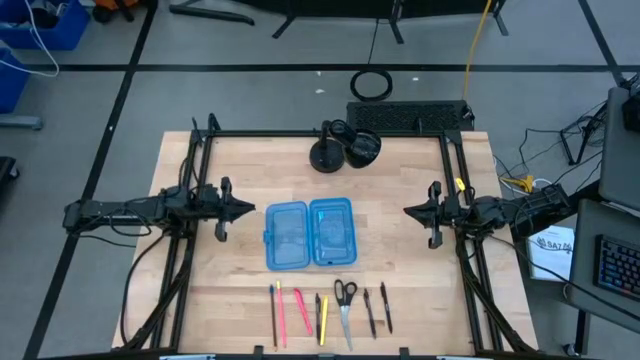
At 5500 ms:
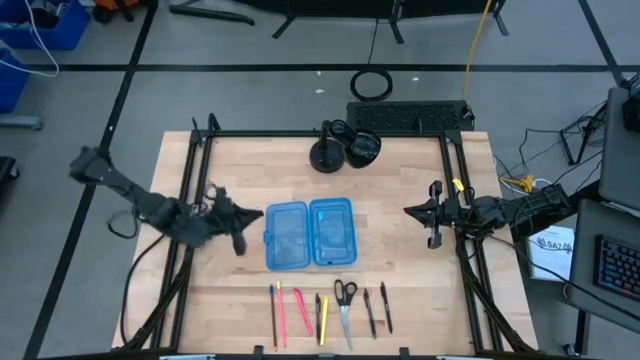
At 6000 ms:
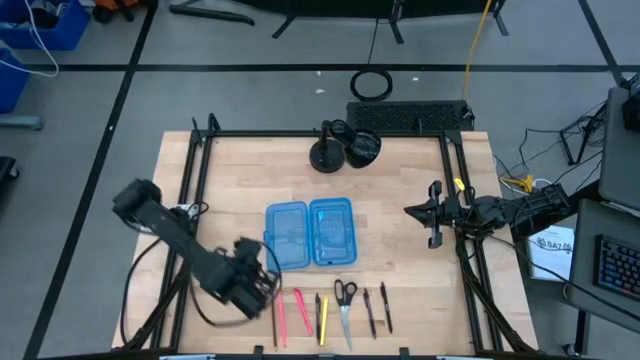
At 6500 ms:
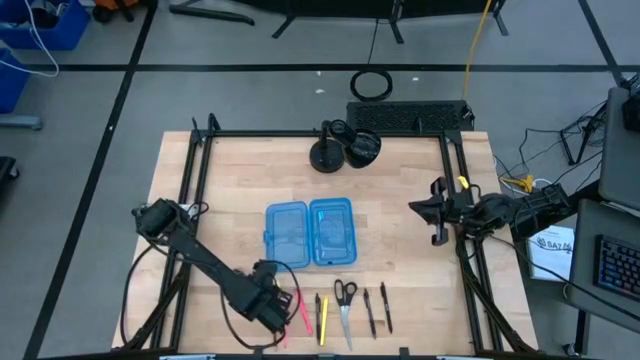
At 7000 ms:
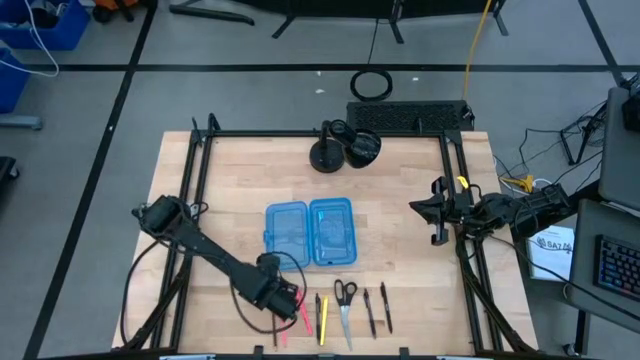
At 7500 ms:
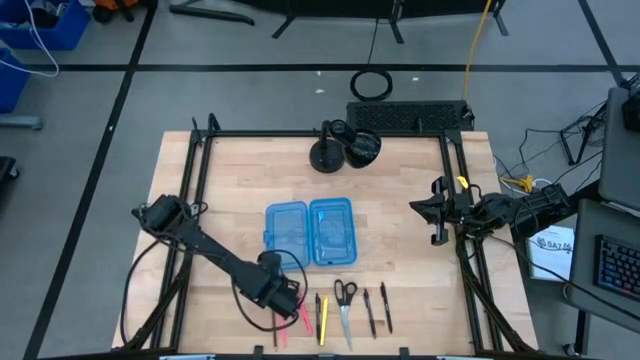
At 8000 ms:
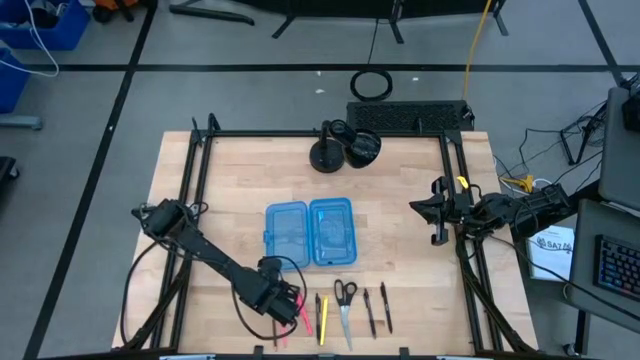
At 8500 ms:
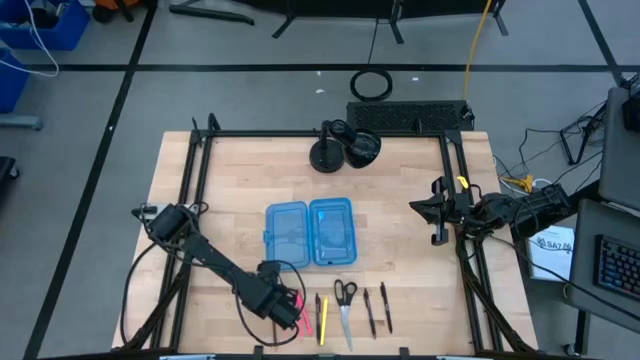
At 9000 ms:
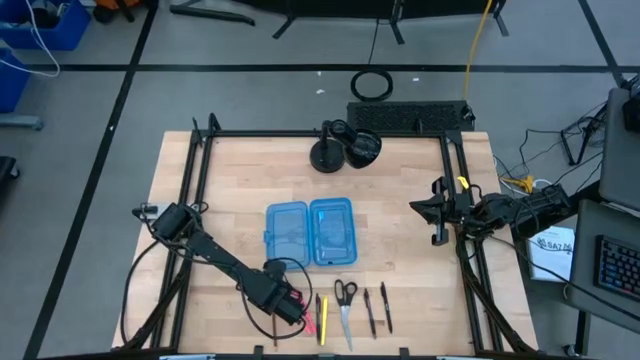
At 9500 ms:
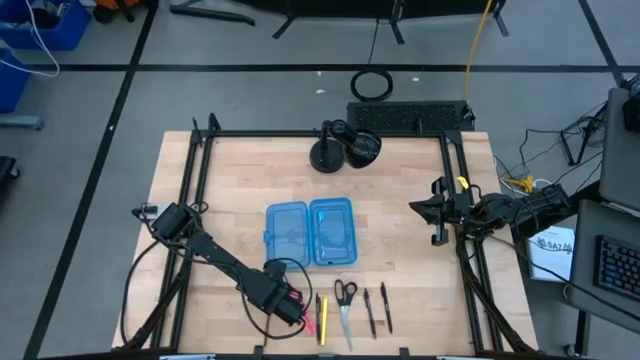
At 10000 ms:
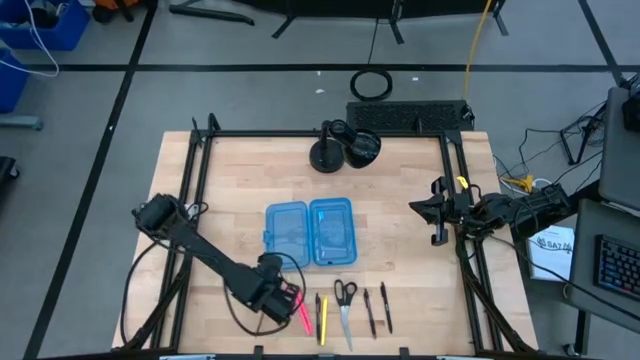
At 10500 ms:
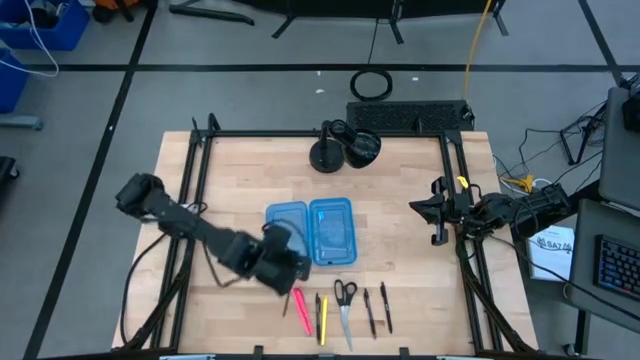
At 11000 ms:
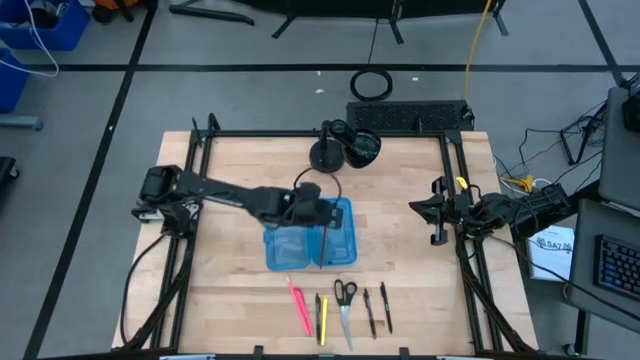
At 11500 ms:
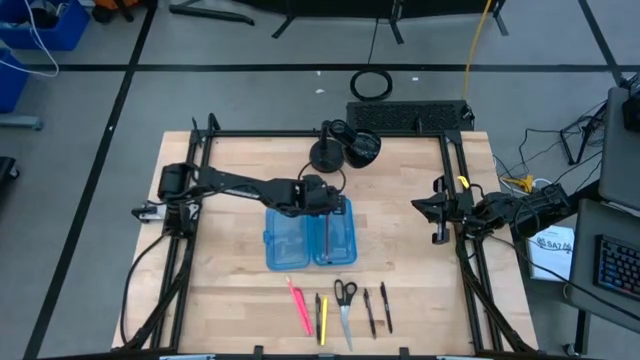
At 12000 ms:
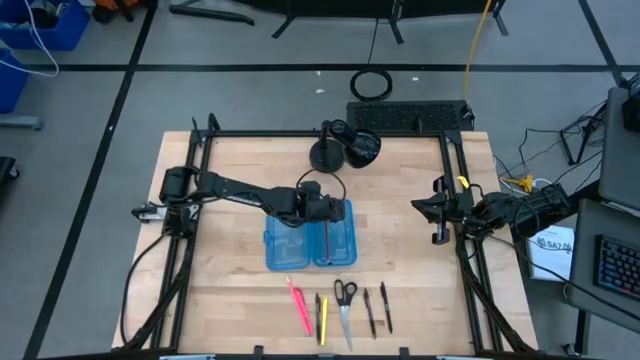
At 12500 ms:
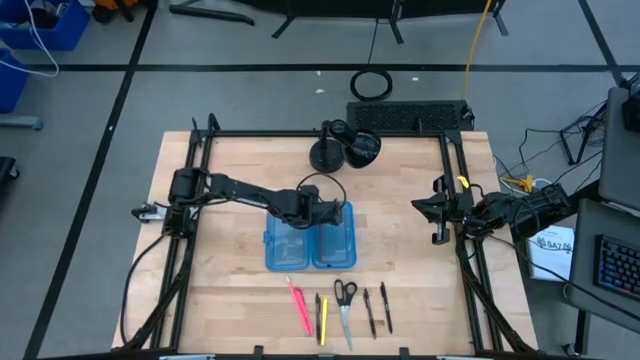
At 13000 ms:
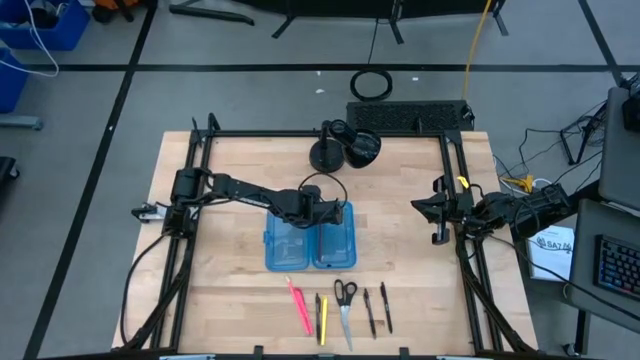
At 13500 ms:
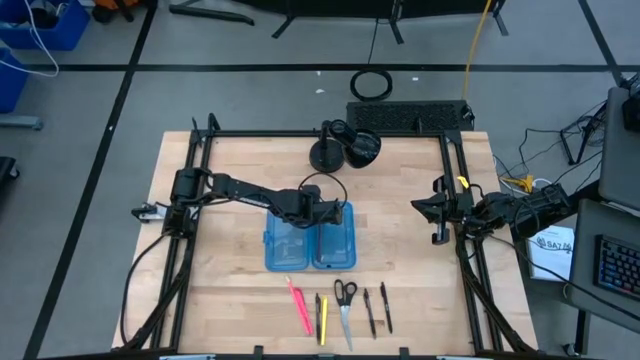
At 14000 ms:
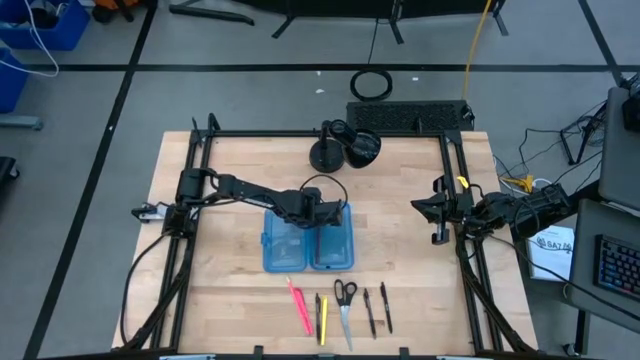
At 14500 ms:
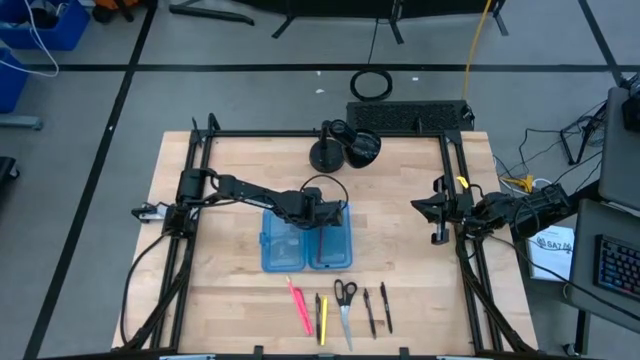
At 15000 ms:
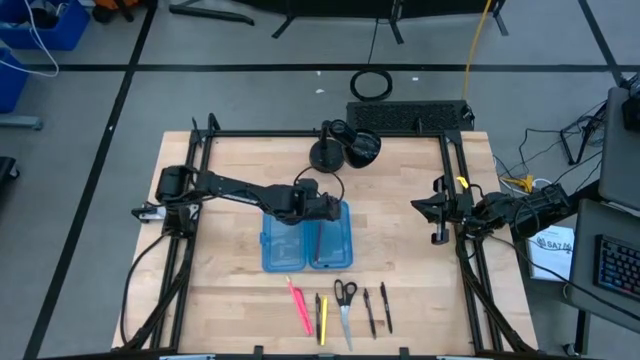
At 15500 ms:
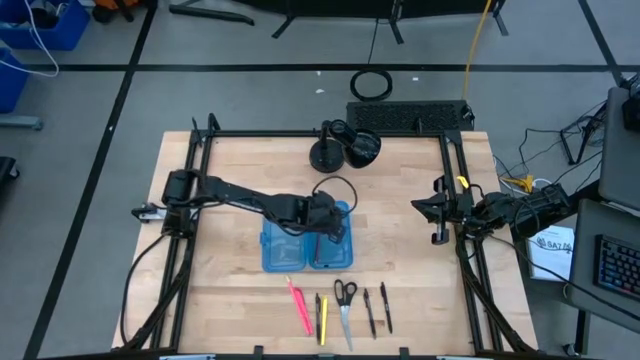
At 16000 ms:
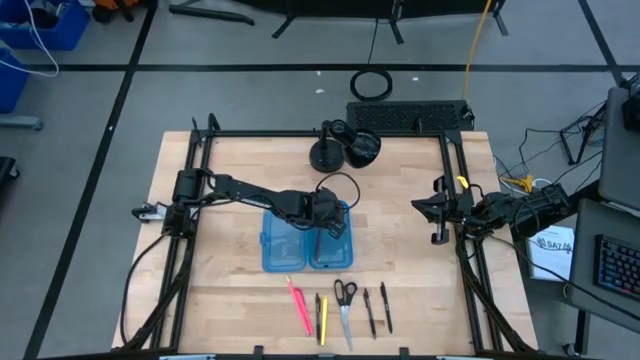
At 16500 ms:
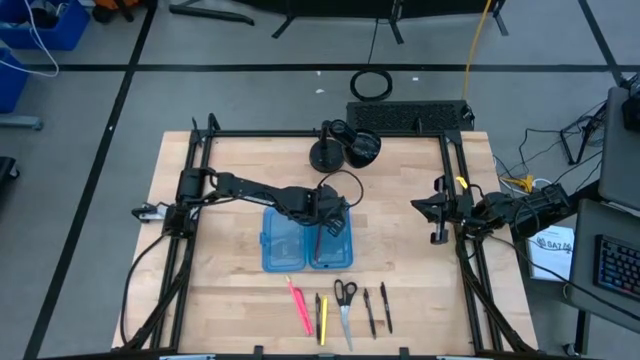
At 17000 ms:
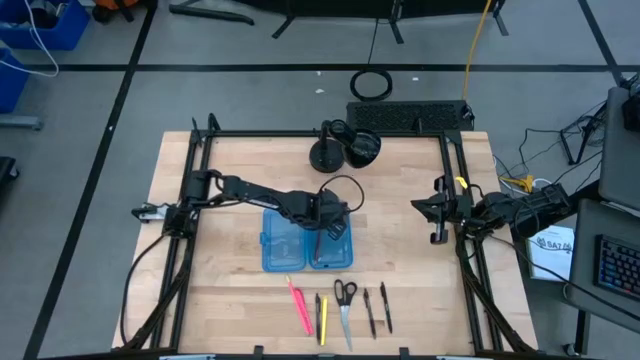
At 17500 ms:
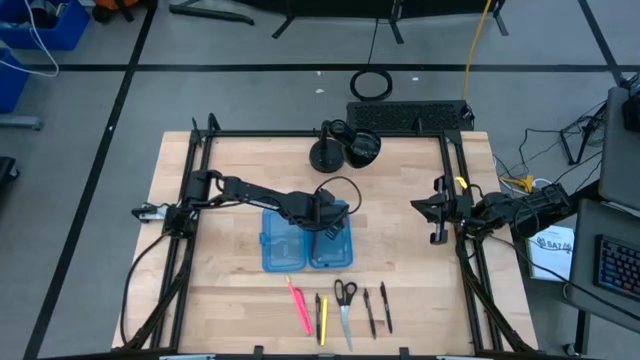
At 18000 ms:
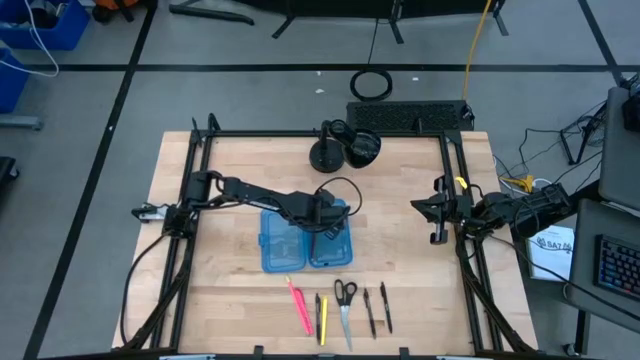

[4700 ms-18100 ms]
Task: Pick & place school supplies into a supply box
Put the brown pencil into the blue supply box

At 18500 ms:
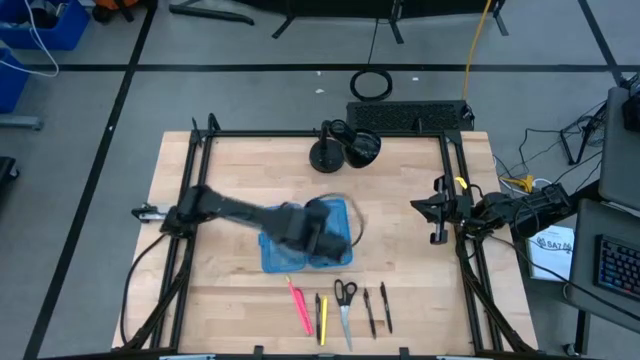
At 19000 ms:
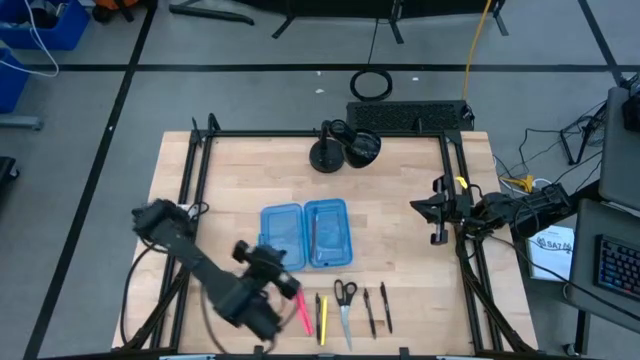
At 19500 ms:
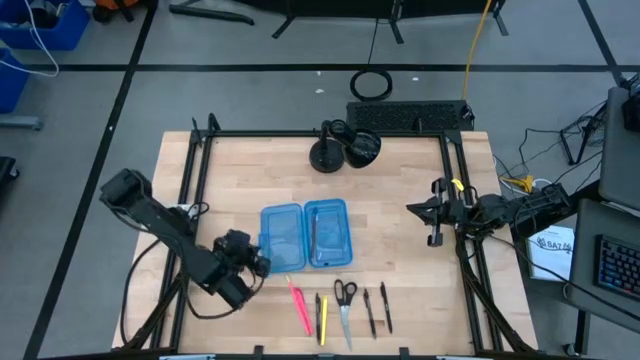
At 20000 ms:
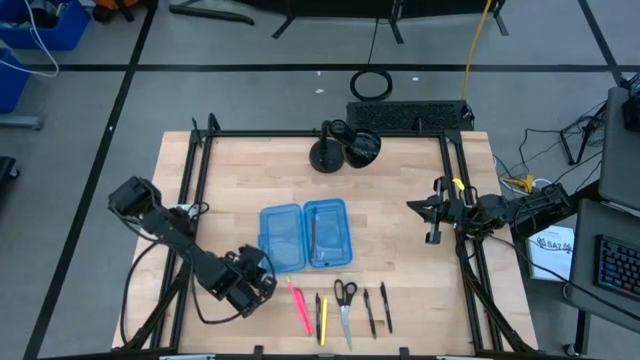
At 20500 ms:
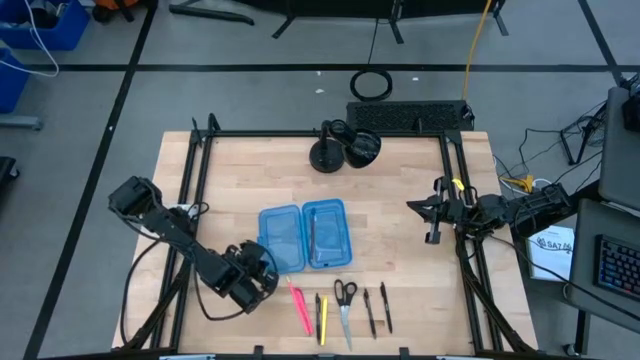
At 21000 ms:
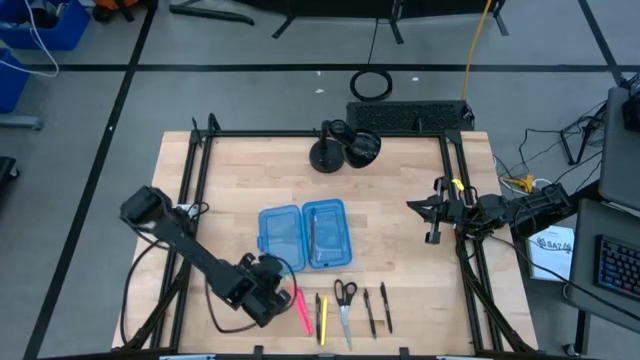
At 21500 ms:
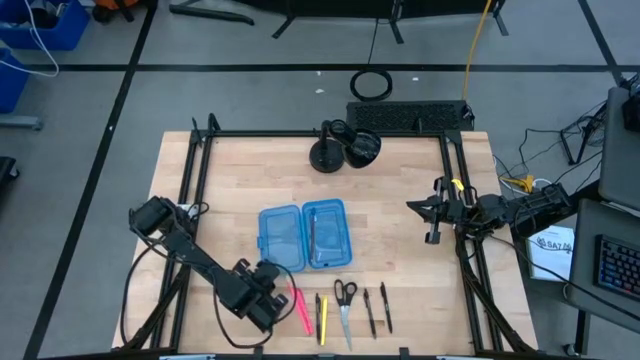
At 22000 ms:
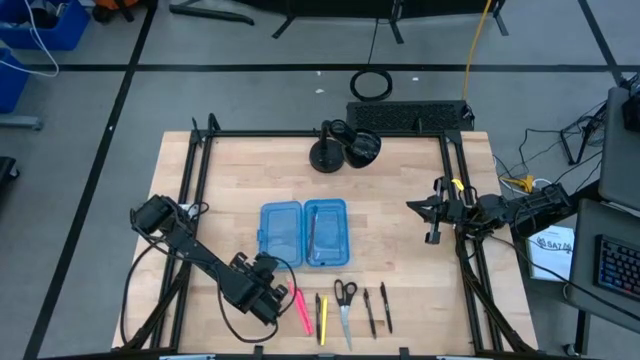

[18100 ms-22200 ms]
Adjust the blue supply box

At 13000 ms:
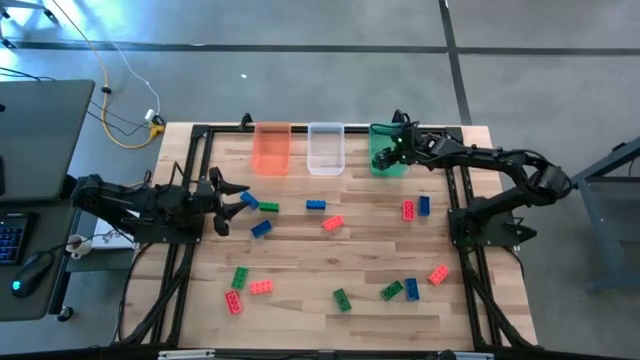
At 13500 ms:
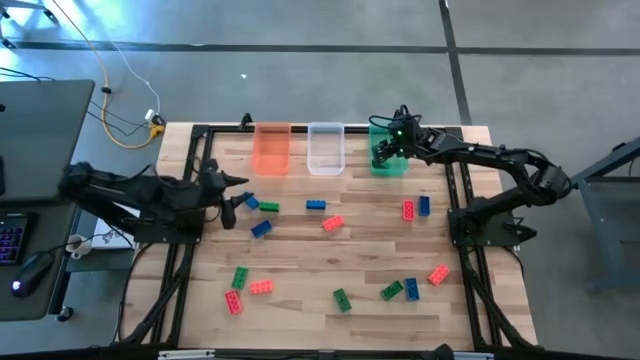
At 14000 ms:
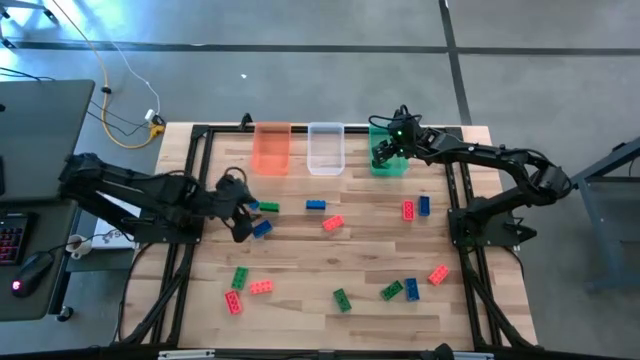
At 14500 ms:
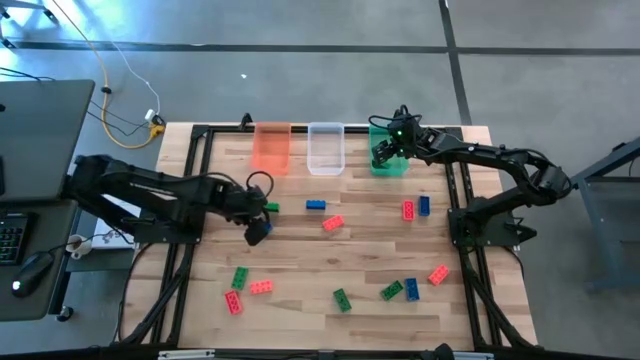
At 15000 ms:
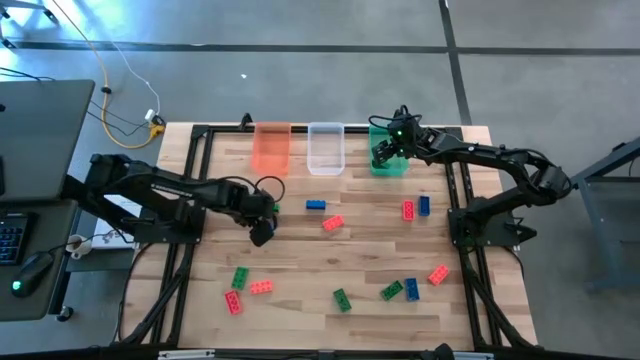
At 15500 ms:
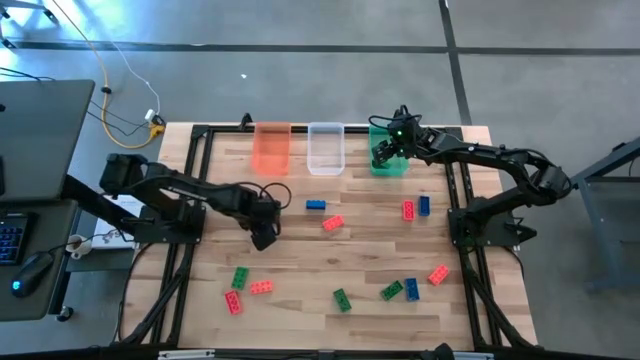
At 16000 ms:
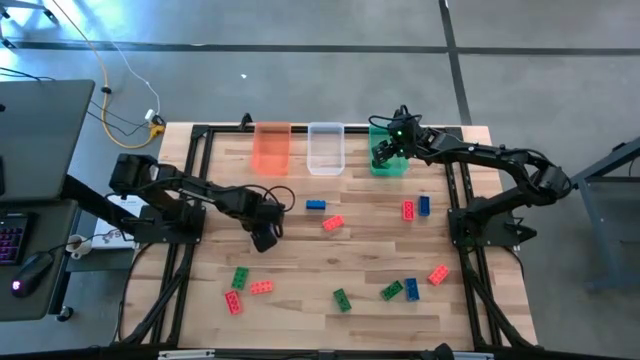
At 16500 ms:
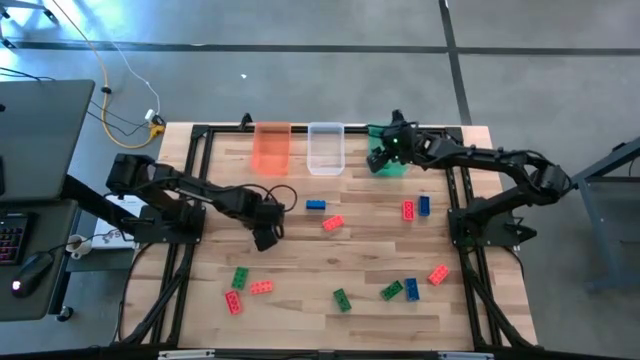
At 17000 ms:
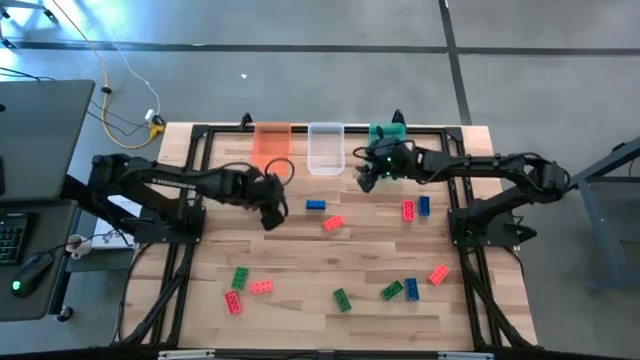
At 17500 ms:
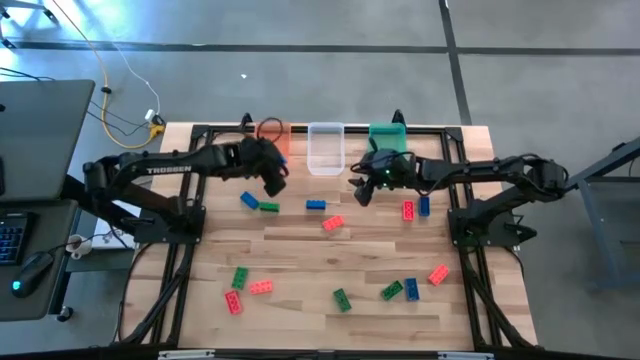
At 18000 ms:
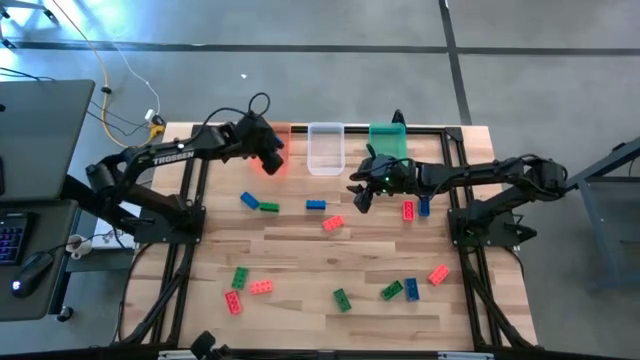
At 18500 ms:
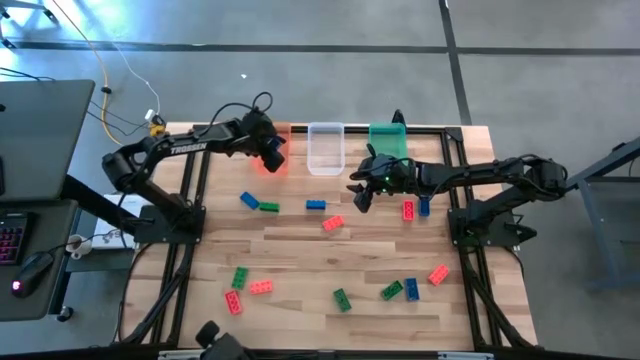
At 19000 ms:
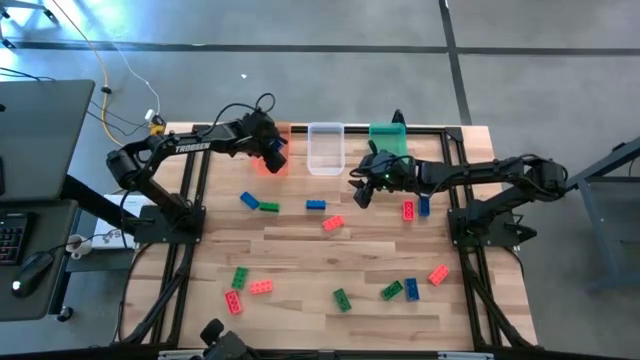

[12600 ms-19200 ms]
Task: Sort & place blocks by color
Put the blue game piece into the orange bin
